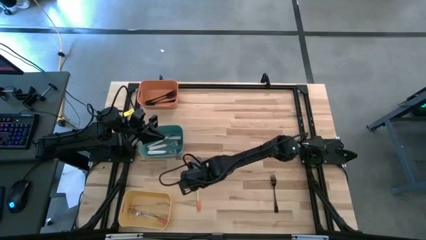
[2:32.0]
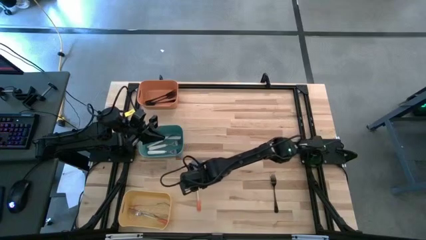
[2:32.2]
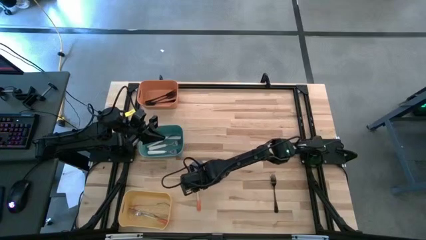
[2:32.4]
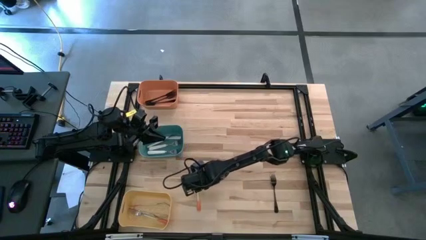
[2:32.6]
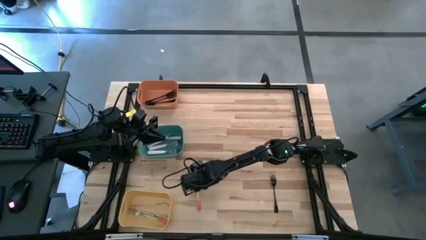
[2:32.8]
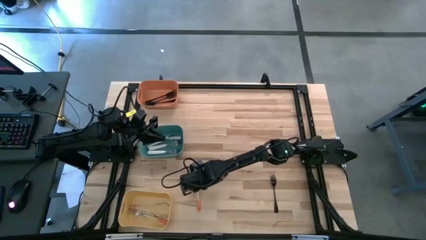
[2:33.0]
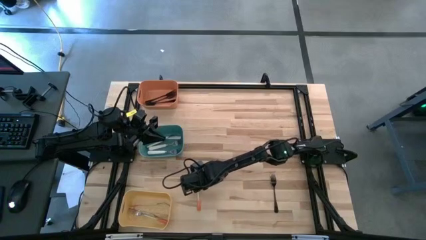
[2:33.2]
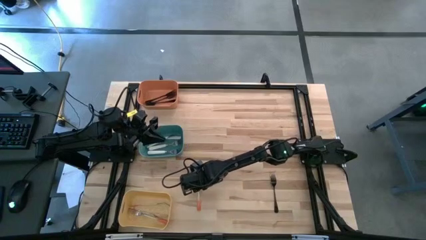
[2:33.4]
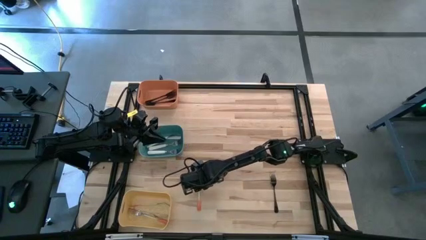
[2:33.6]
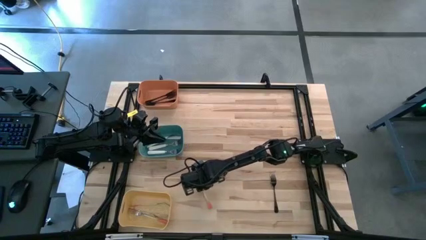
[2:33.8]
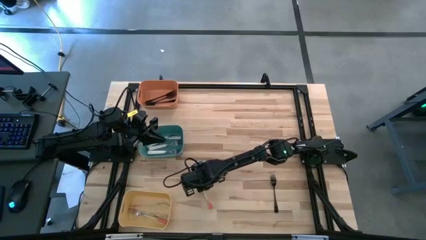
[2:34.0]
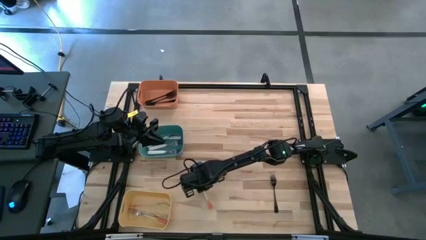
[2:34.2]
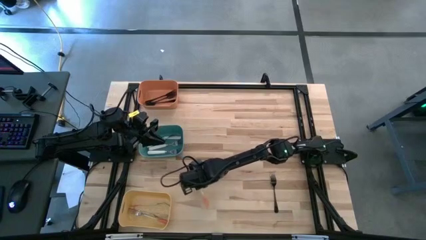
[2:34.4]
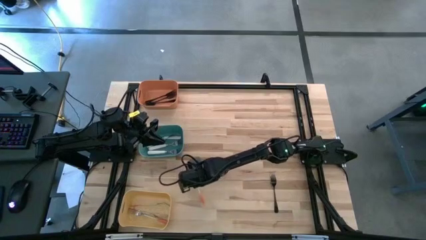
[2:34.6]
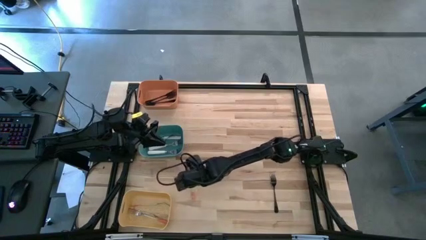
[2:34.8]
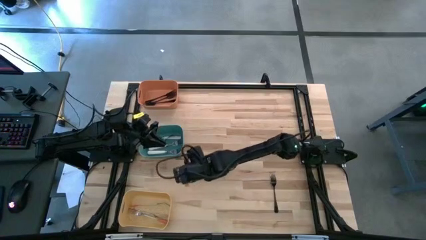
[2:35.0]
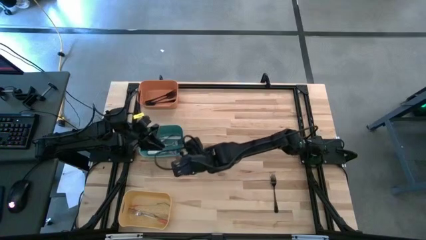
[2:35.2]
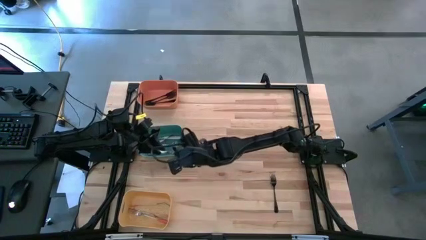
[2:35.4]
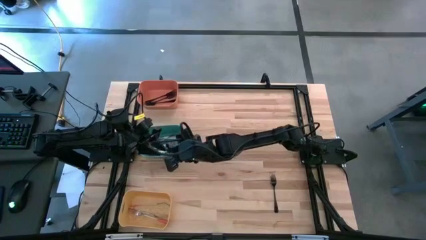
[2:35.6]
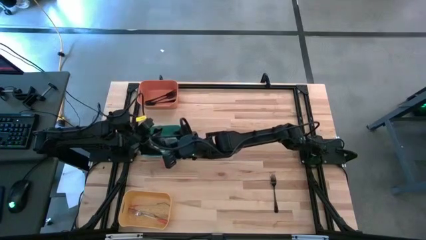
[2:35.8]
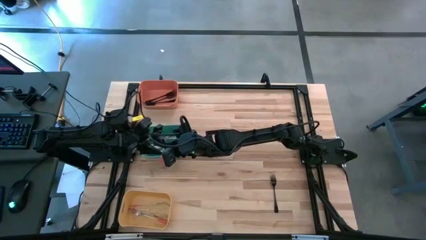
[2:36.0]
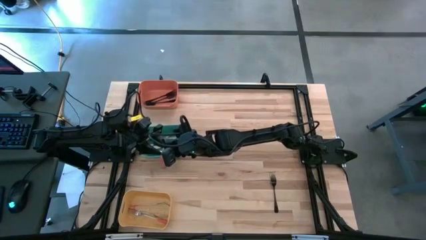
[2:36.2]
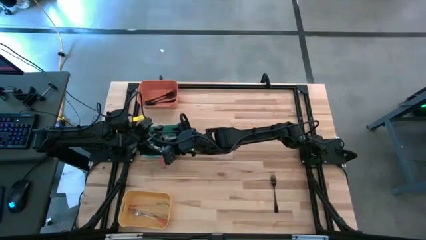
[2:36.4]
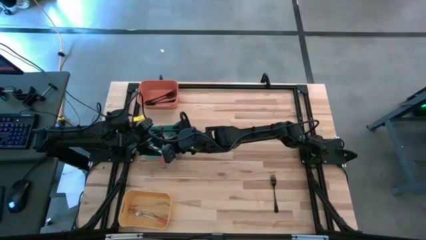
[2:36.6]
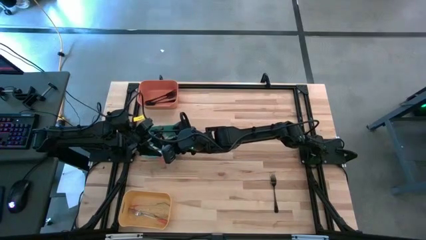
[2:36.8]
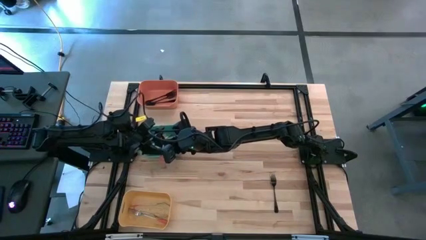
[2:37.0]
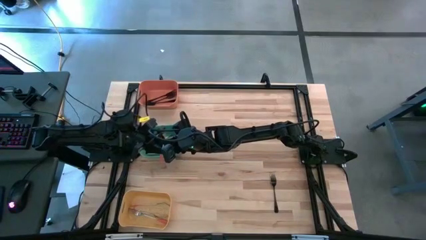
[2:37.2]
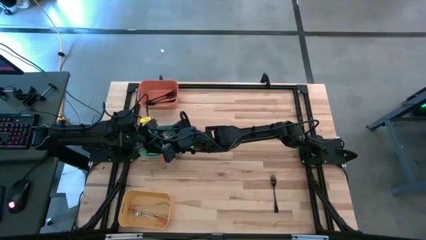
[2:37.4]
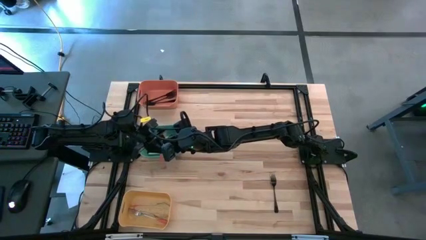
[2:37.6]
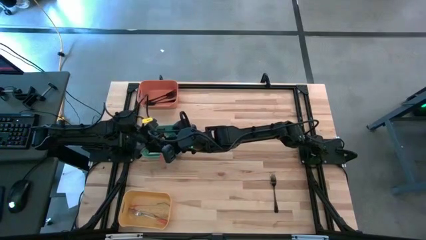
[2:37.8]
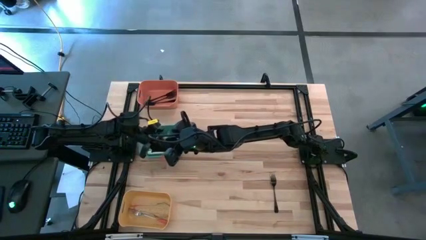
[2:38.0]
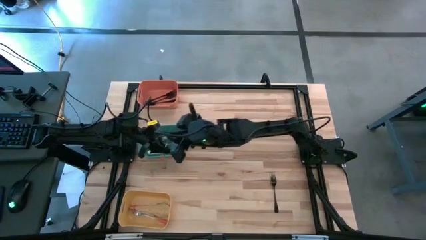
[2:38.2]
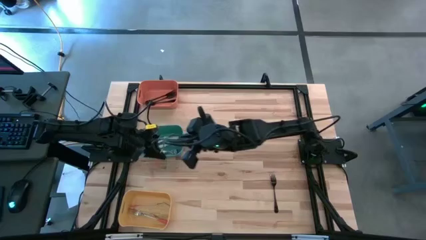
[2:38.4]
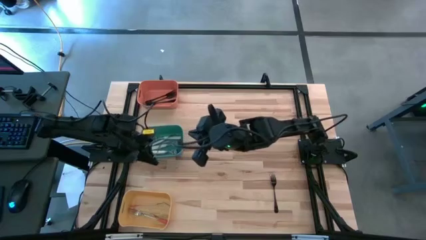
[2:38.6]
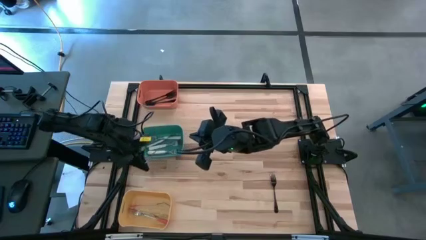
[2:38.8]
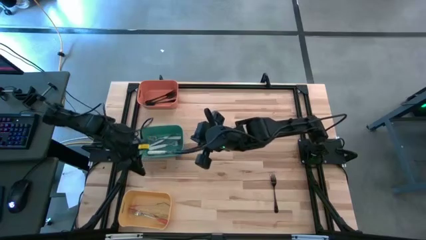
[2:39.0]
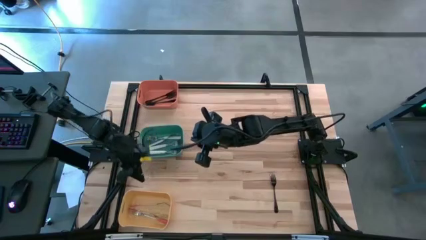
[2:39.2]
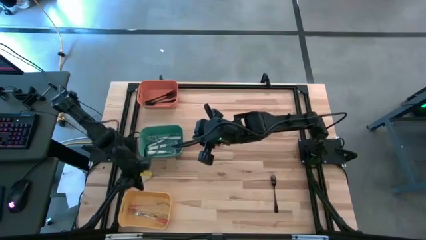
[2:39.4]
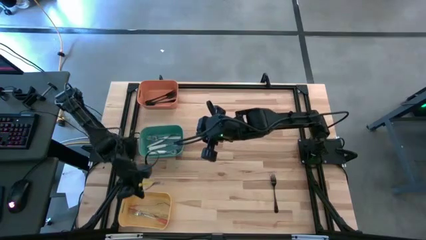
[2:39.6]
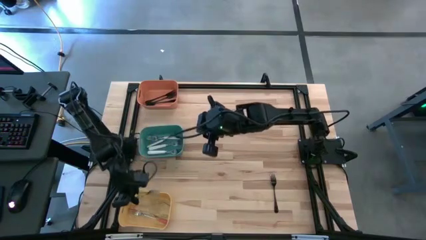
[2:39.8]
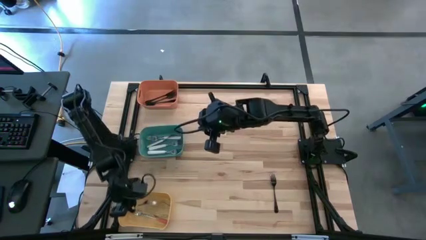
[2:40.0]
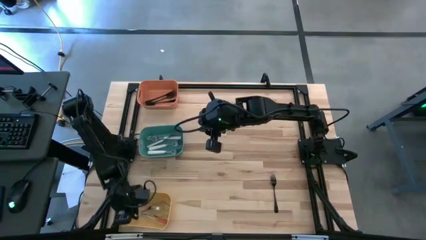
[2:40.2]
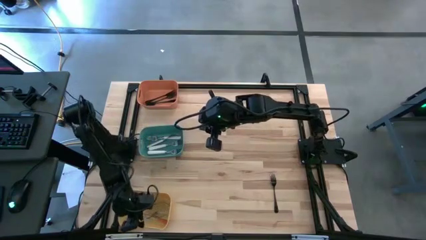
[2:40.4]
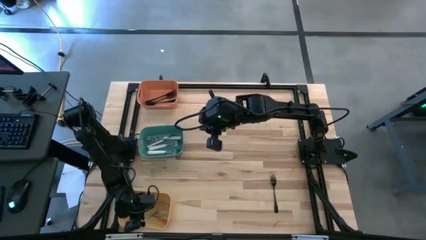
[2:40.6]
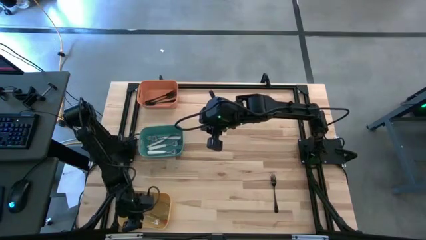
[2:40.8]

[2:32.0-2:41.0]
Task: Sort silverware by color (type)
Put the orange fork into the yellow bin

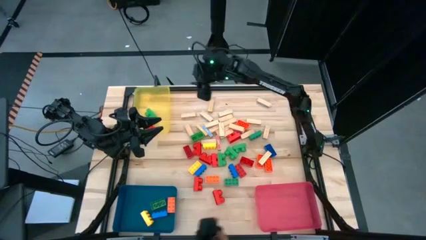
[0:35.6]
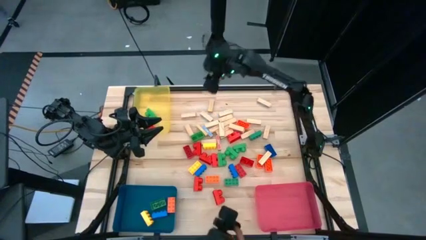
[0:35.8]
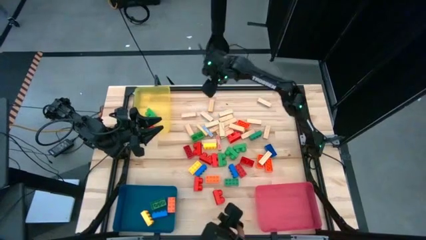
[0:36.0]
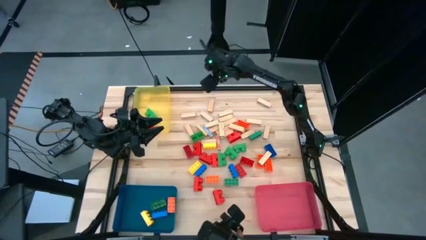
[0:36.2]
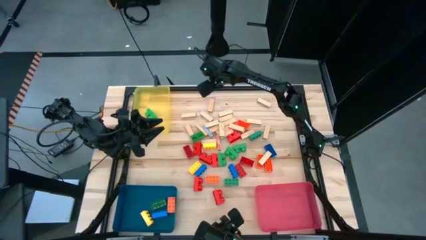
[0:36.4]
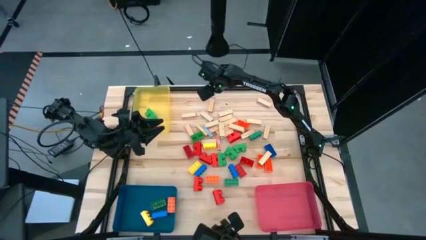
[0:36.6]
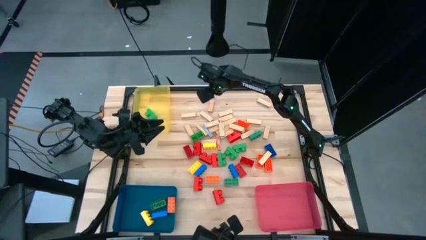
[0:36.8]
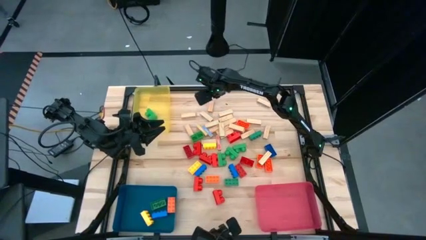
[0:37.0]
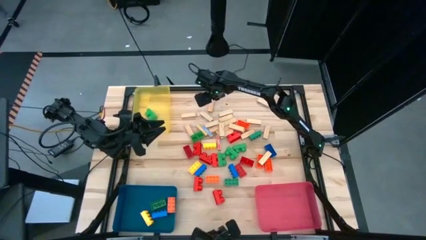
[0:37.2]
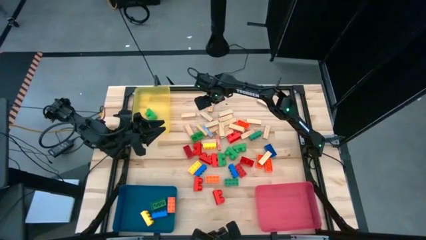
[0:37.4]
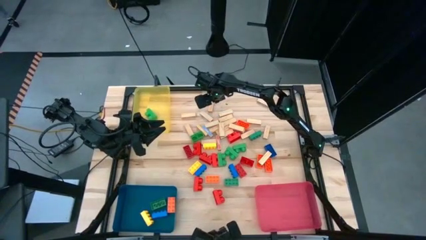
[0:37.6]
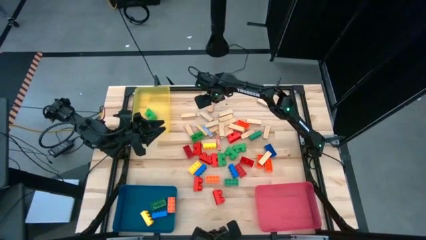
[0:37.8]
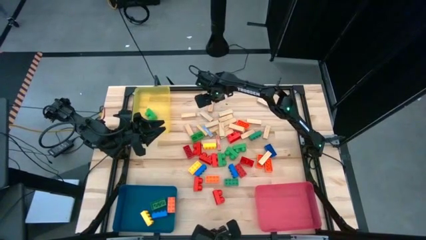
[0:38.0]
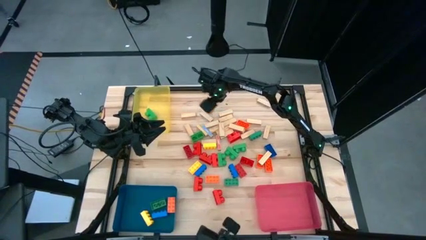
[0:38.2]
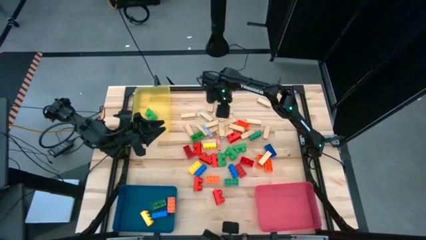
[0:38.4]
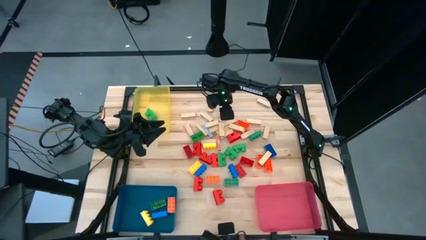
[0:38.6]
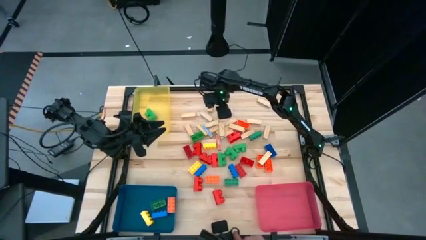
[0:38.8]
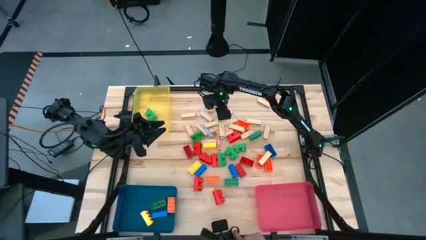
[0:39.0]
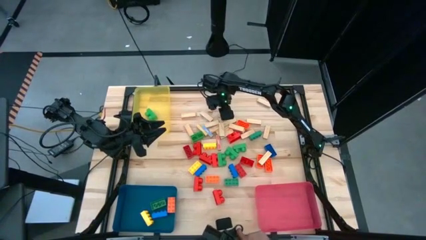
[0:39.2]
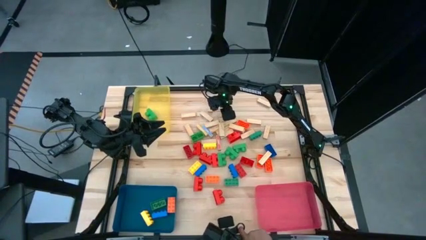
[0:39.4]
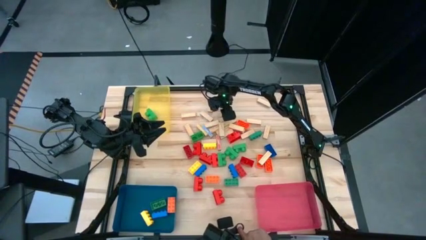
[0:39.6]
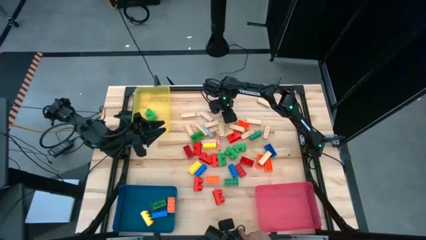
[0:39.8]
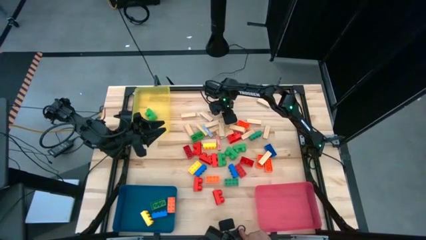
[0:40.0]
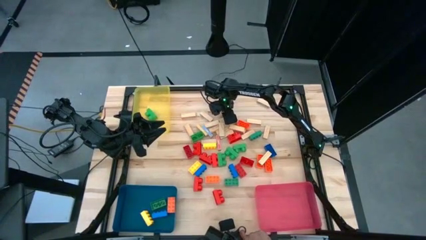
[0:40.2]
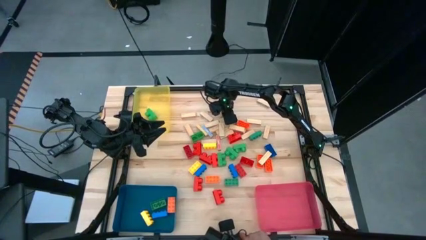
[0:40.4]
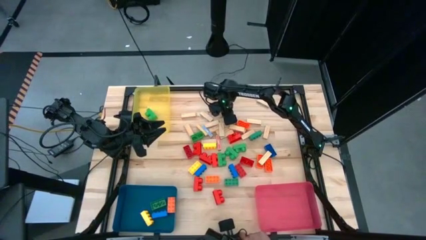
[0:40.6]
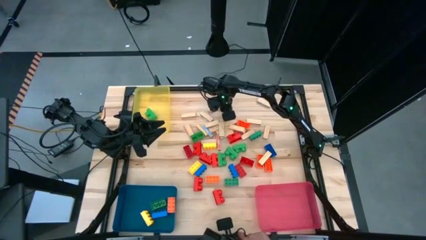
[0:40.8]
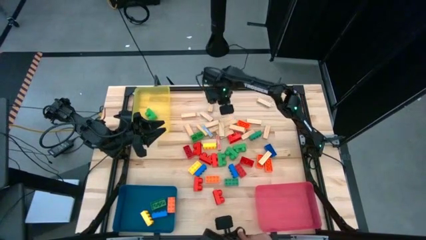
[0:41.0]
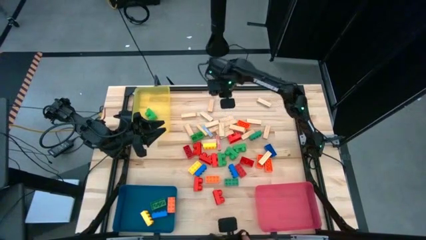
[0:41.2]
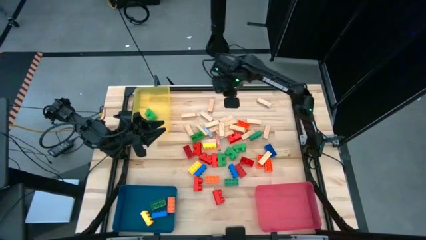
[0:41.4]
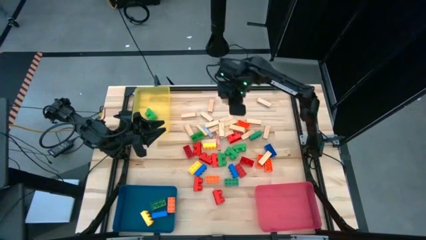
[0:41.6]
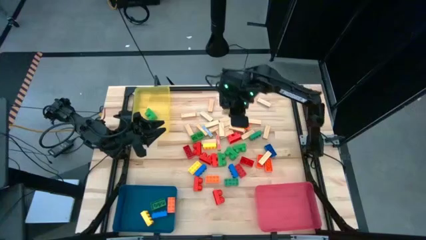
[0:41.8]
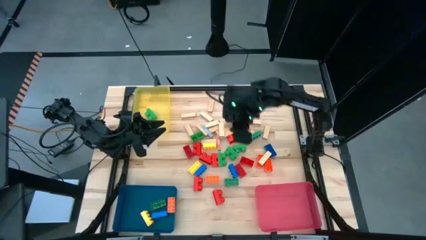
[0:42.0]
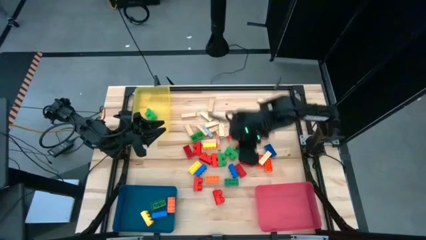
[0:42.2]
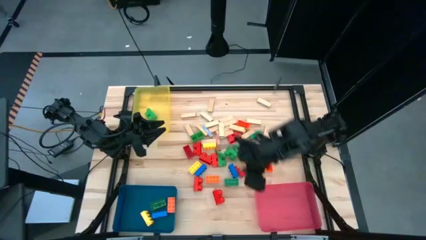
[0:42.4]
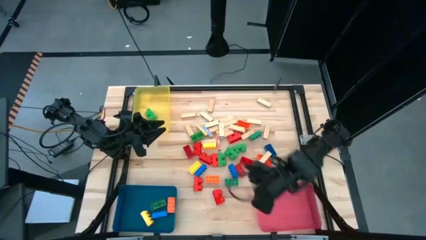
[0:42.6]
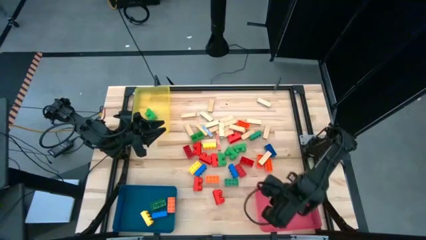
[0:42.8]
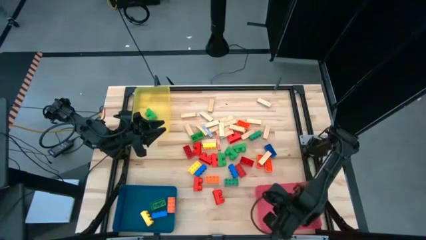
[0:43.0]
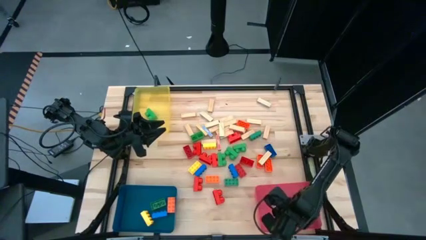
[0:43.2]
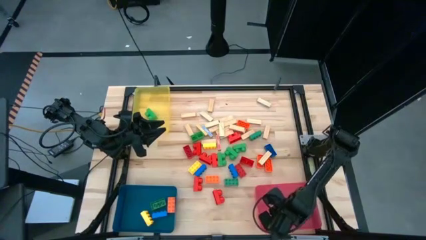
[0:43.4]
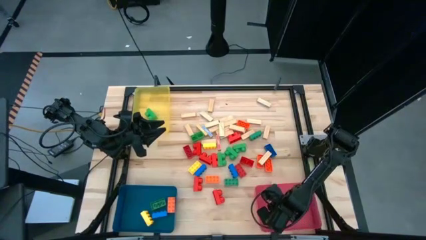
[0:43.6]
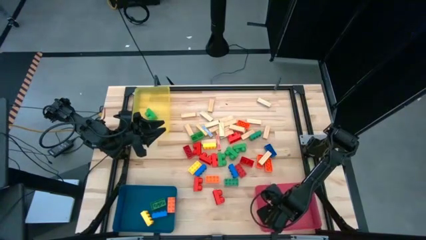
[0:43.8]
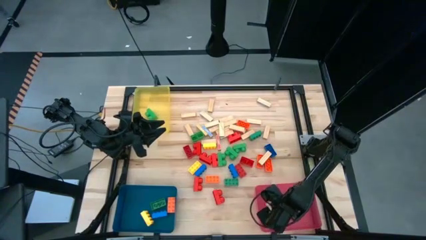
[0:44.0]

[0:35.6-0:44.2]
Task: Sort blocks by size
Put the wooden block into the red bin
